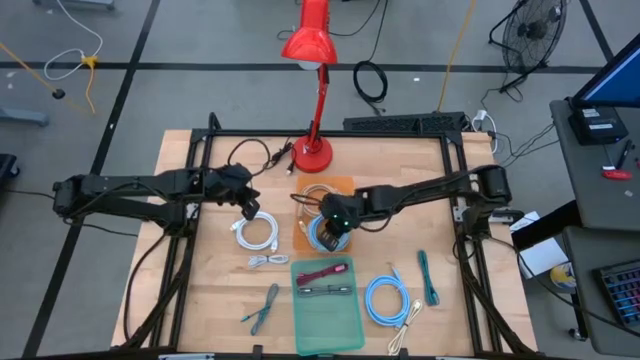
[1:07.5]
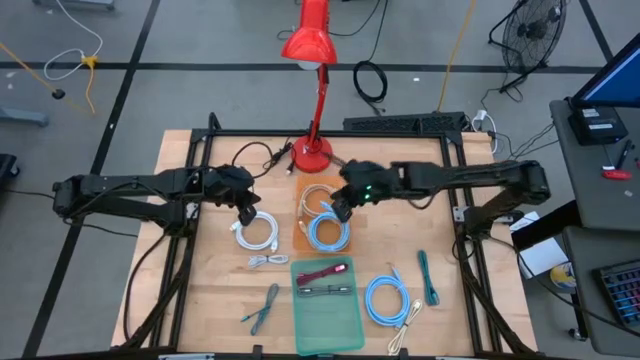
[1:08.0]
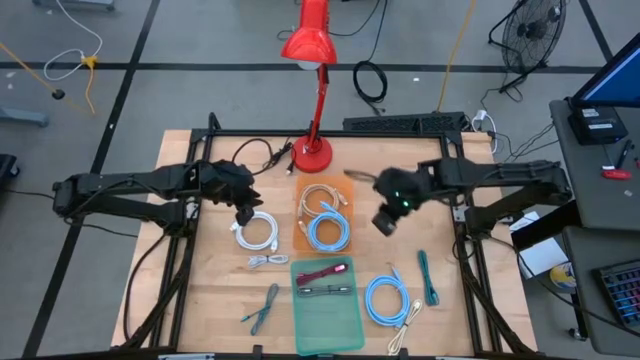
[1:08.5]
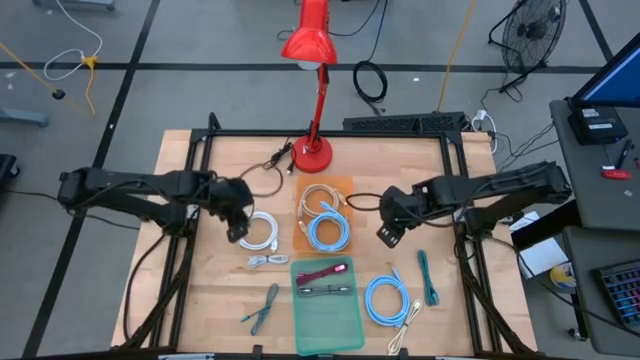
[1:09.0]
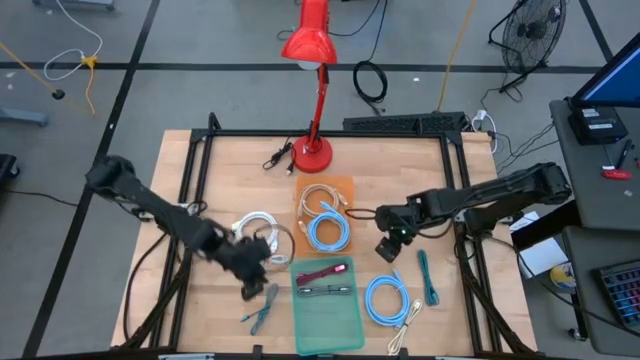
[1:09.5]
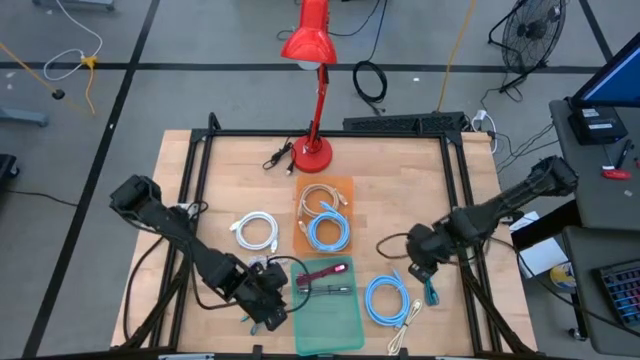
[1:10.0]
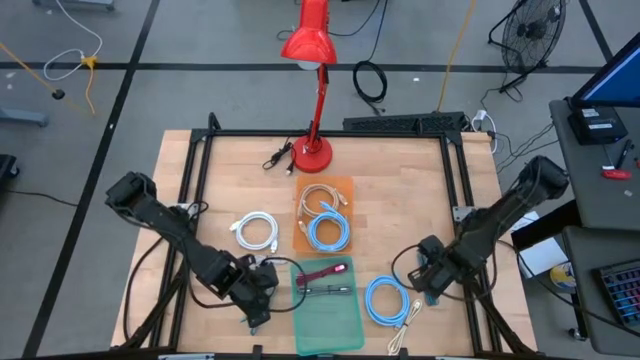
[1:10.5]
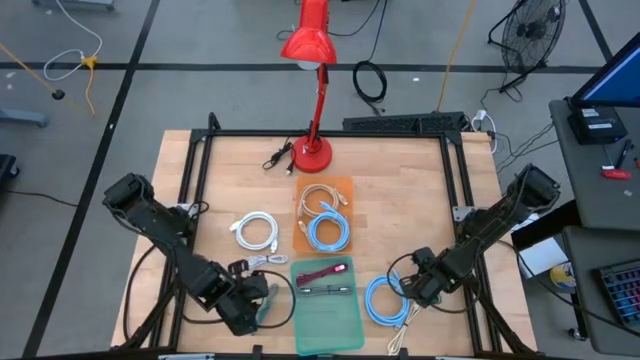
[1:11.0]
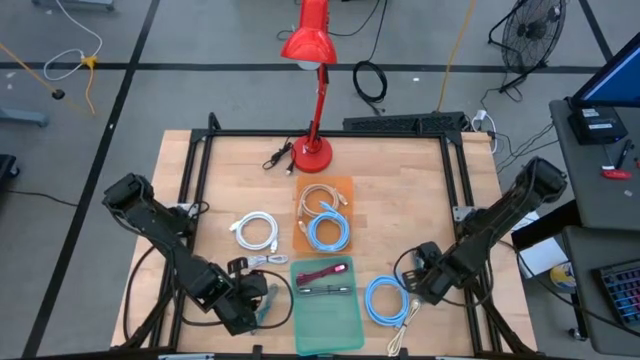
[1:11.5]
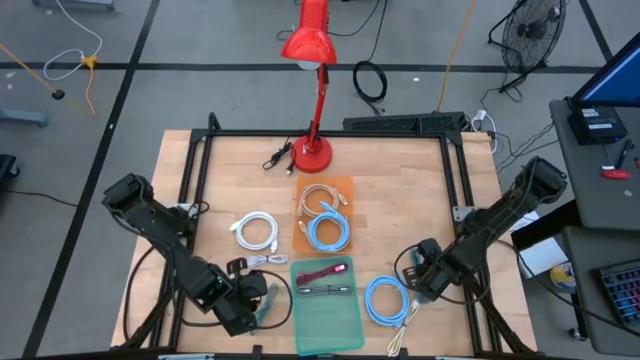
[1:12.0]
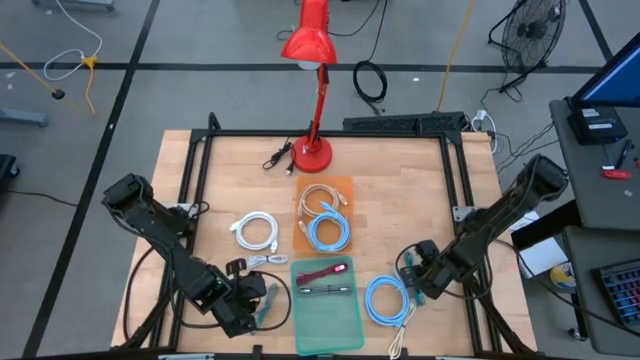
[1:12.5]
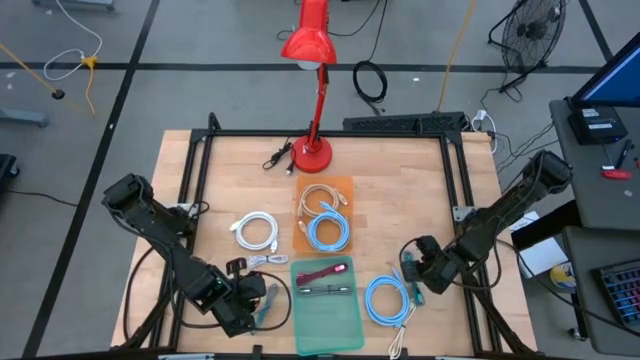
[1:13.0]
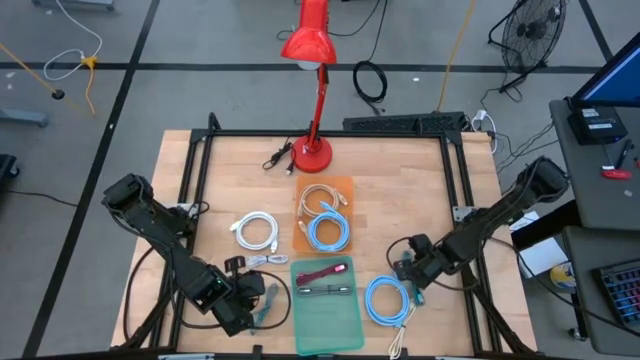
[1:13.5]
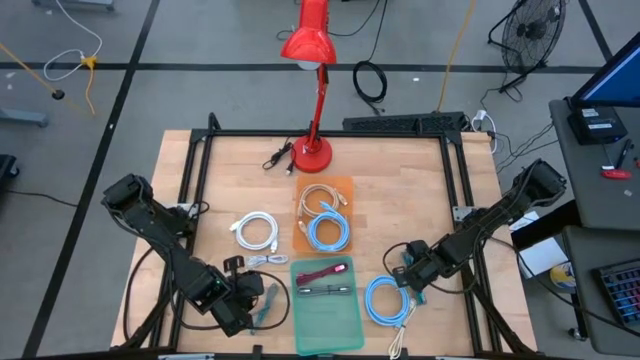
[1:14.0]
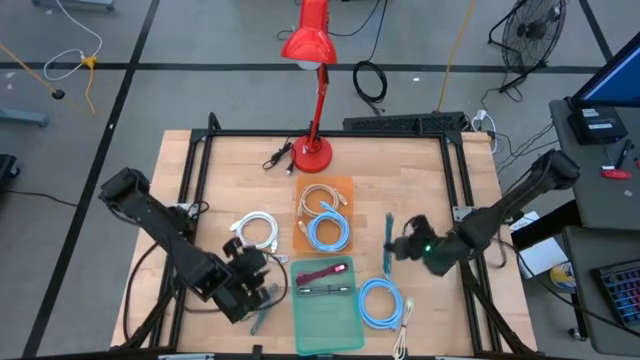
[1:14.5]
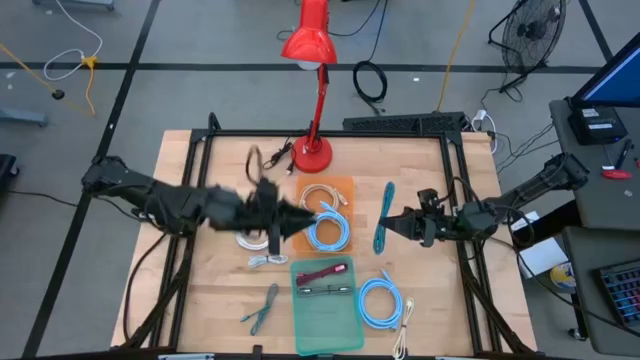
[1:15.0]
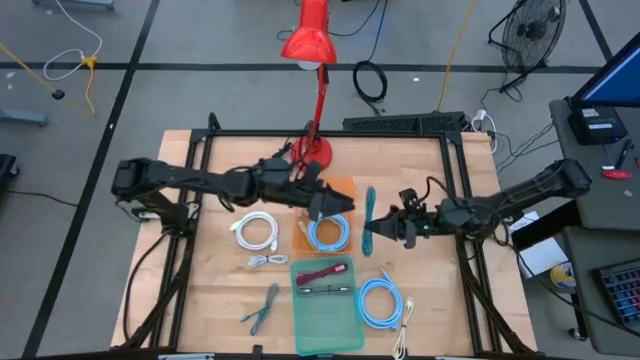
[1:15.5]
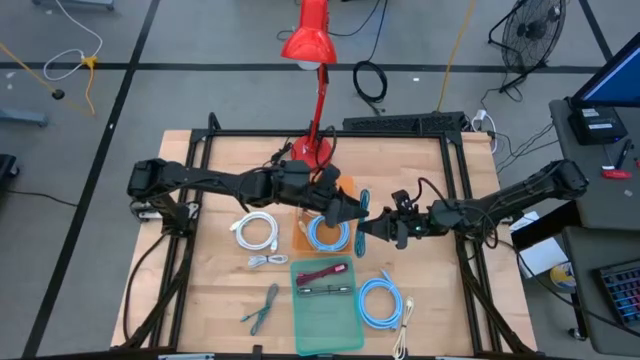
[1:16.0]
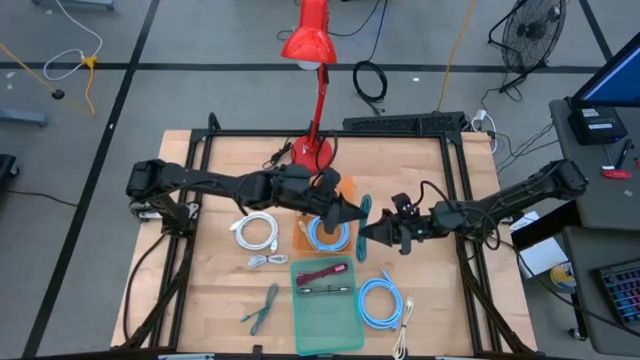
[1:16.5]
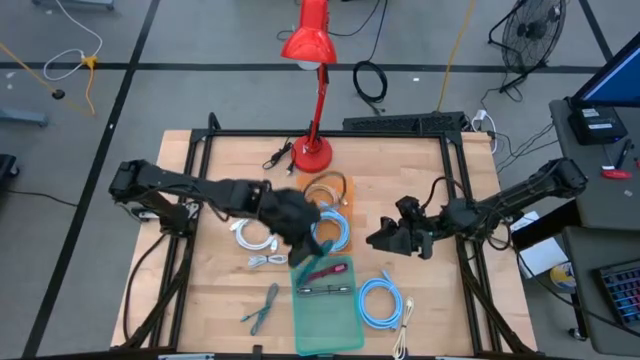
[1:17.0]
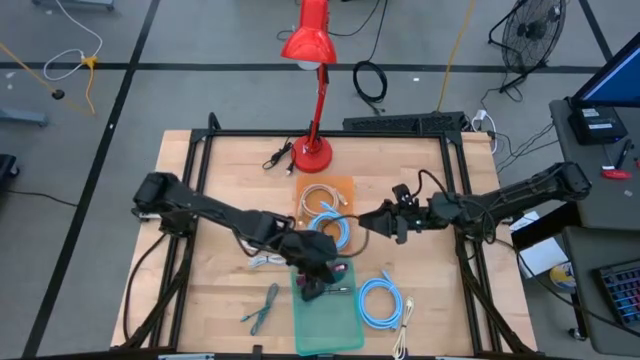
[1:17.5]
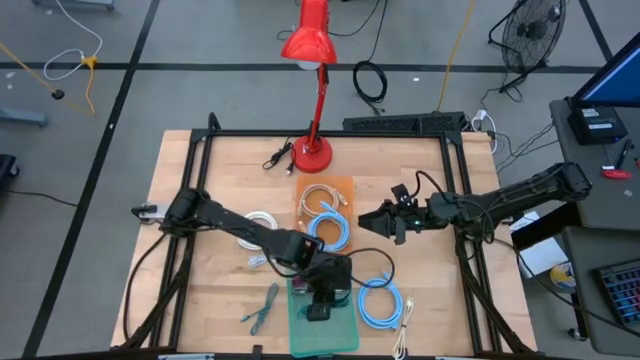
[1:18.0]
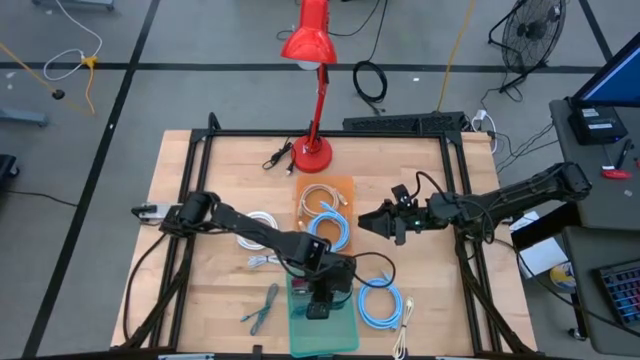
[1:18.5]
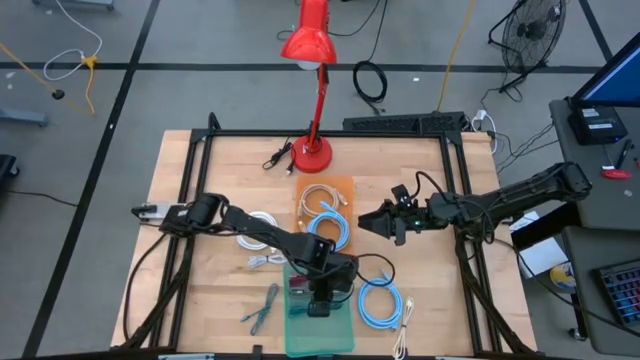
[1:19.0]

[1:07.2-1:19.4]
Task: Sort cables
Put the right blue charger cable into the blue bin

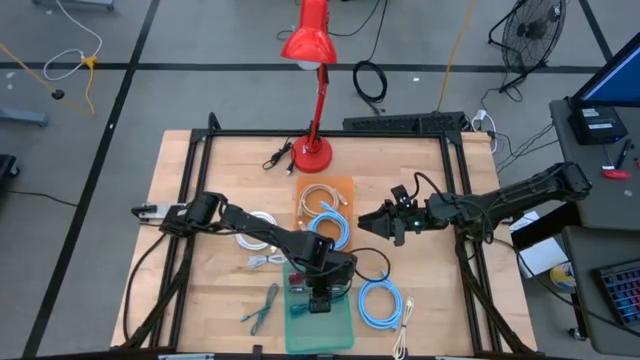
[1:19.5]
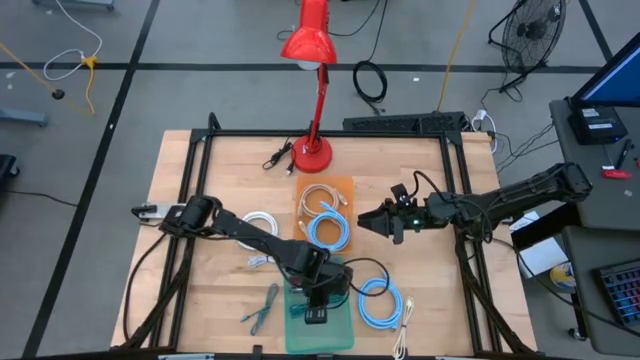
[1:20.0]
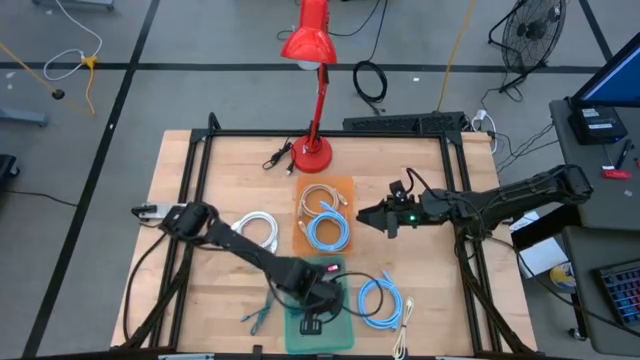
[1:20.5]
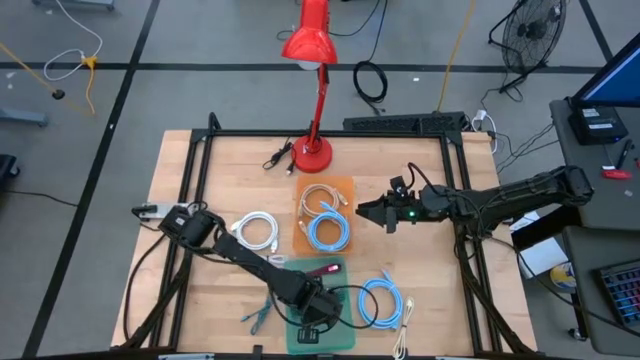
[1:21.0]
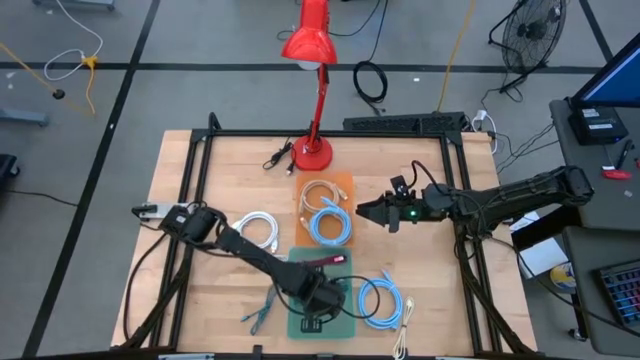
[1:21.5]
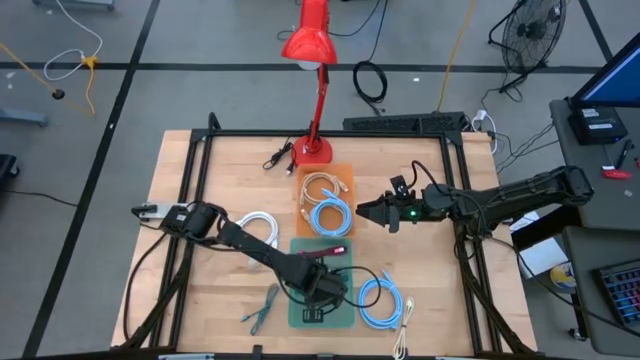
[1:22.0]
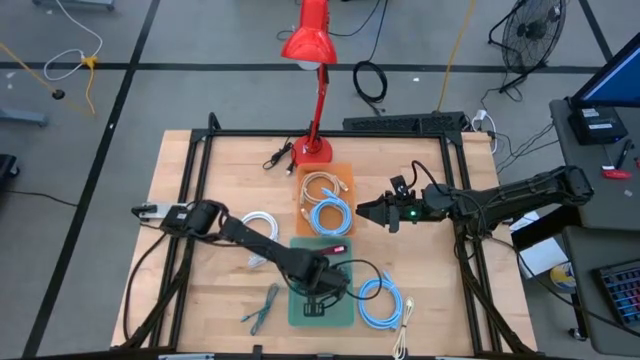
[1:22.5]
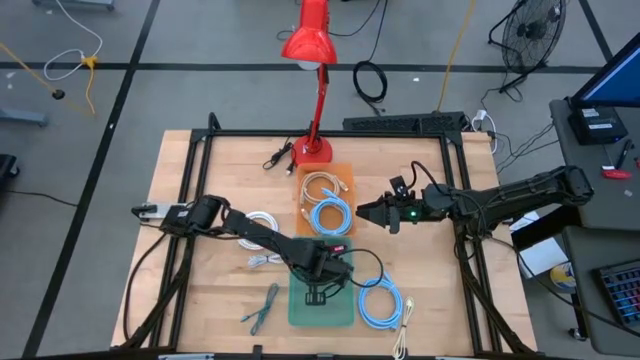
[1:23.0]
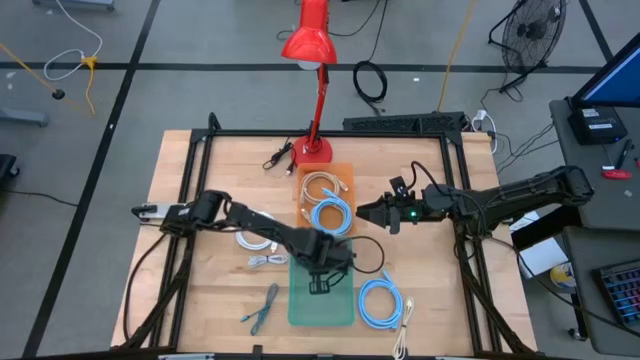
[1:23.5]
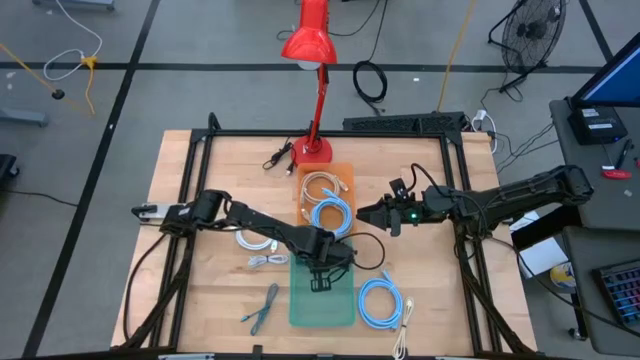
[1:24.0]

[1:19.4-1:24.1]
Adjust the charger cables in the blue bin

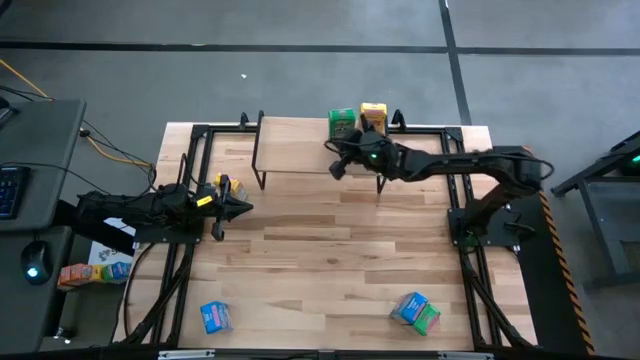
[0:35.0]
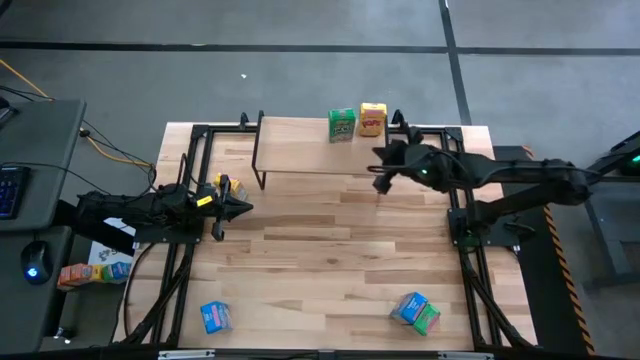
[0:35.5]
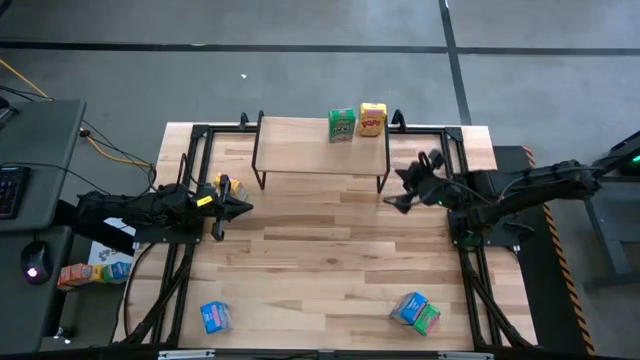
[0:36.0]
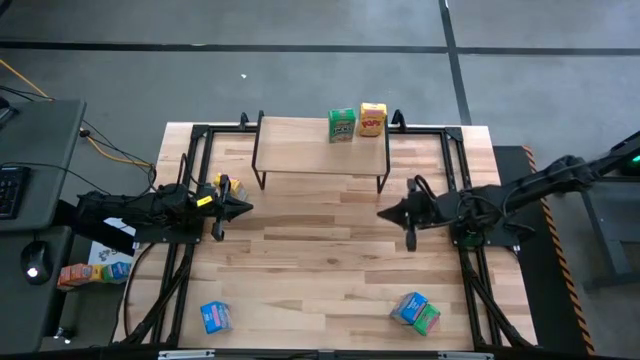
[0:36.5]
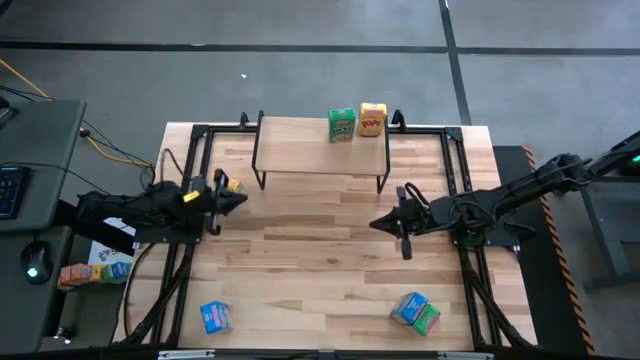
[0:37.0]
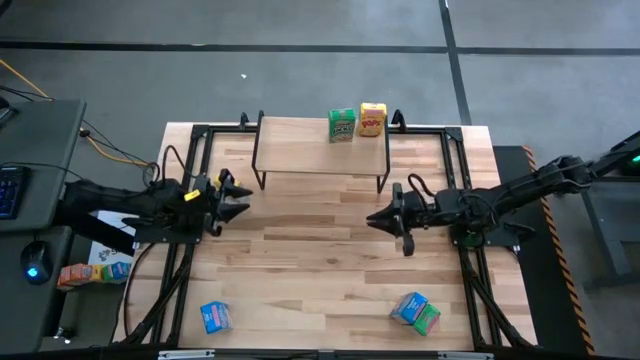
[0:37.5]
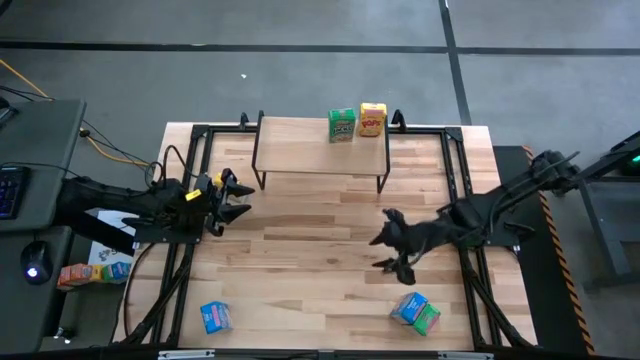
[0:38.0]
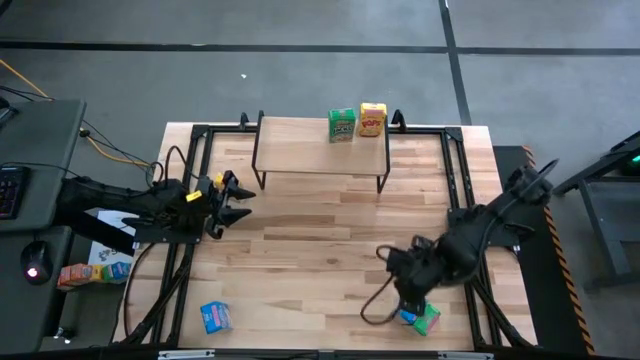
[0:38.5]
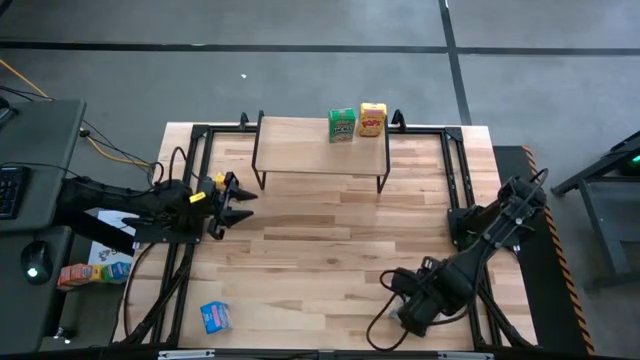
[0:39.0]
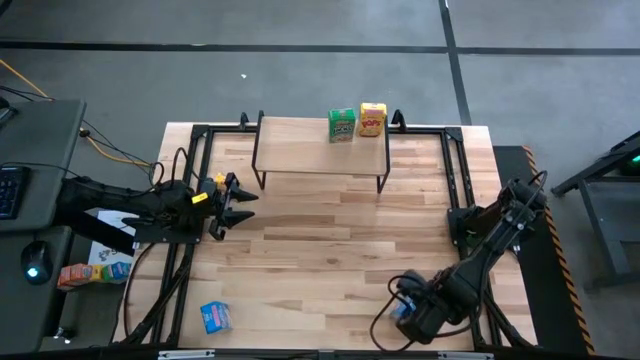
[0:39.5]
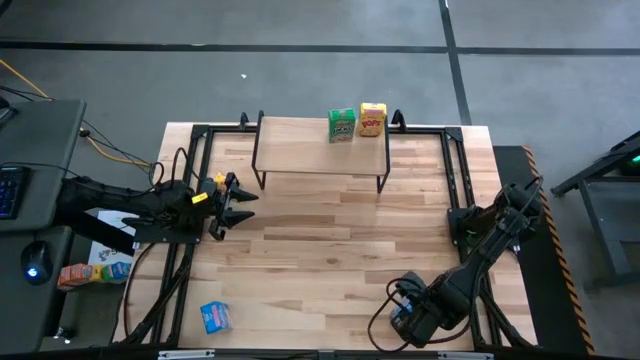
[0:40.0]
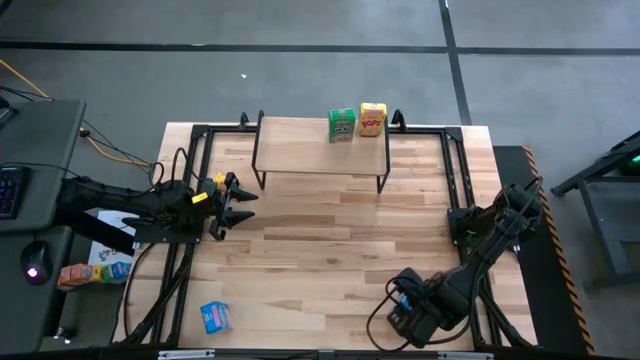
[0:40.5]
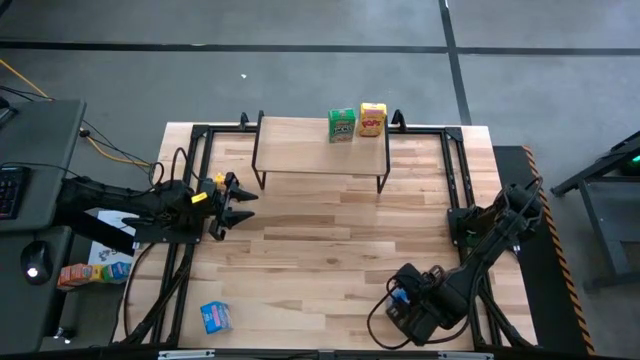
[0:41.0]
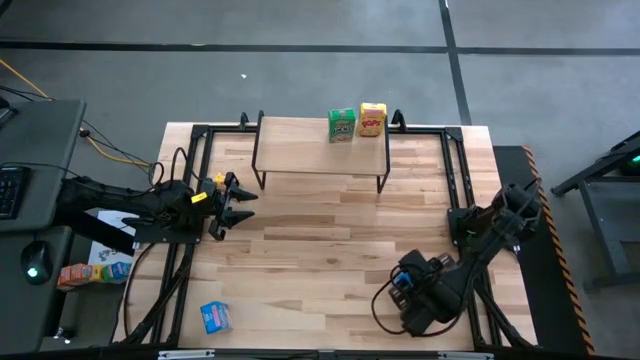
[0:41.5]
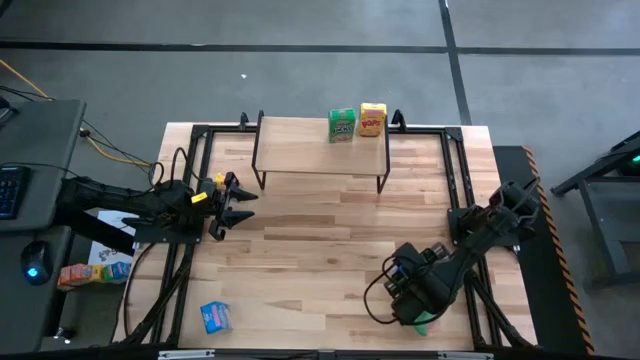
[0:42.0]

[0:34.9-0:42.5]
Task: Stack cereal on shelf
Move the right blue cereal box to the middle right of the table
